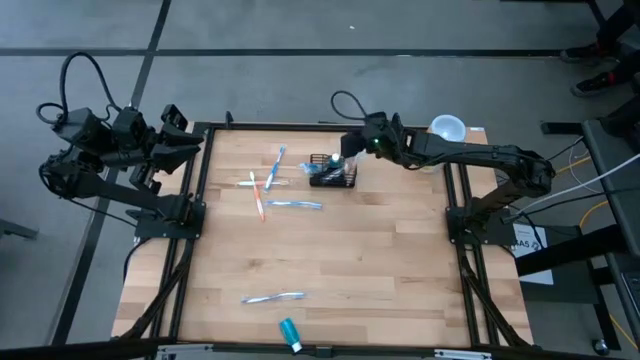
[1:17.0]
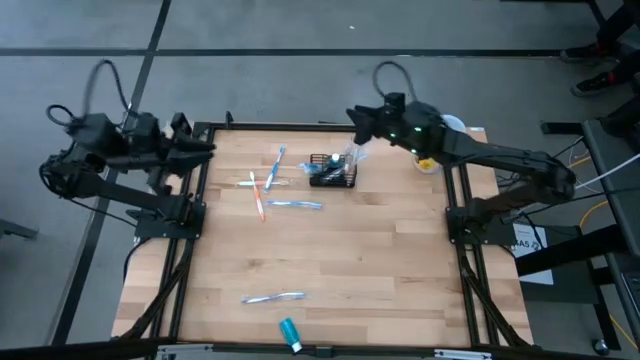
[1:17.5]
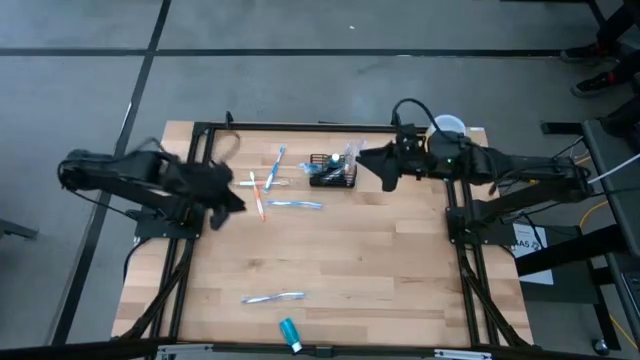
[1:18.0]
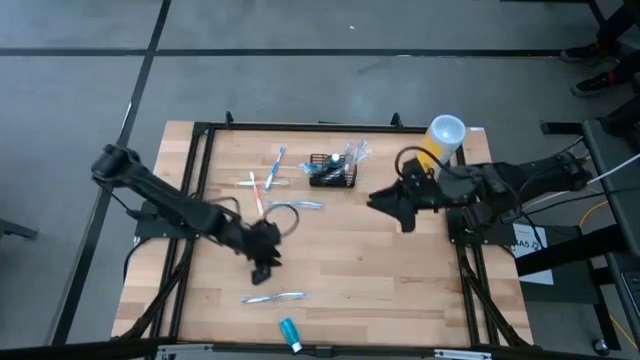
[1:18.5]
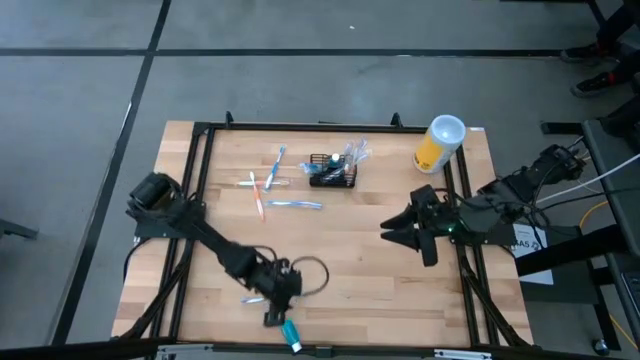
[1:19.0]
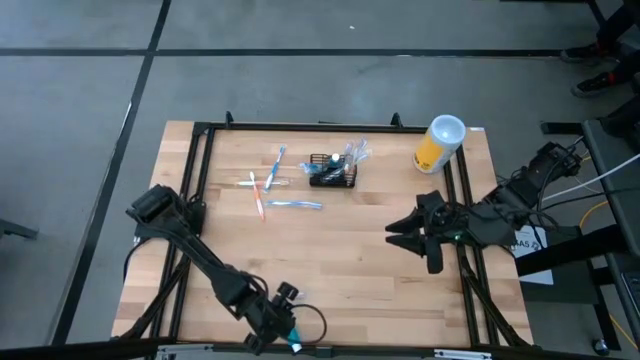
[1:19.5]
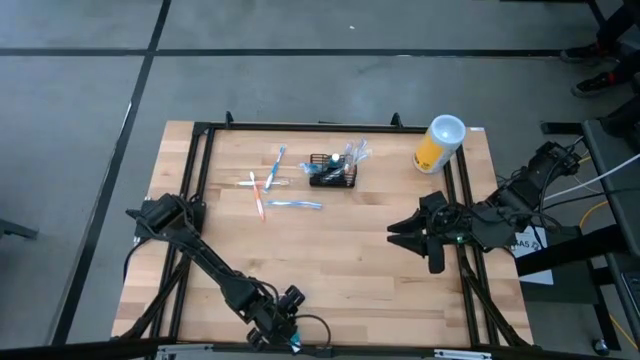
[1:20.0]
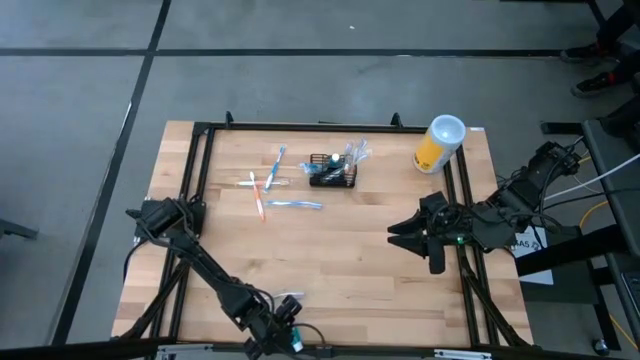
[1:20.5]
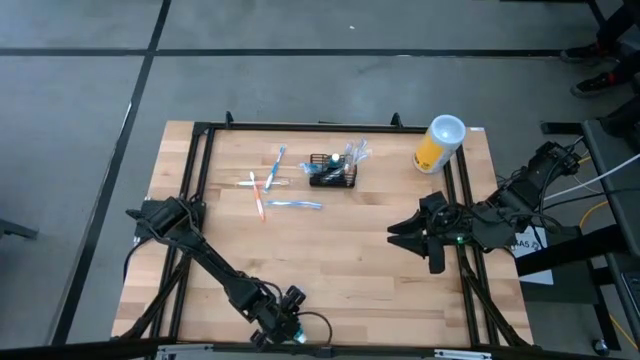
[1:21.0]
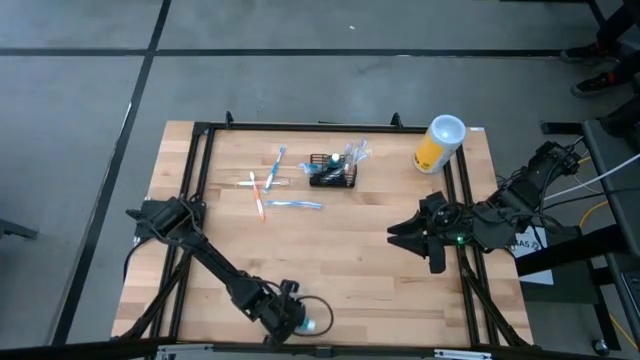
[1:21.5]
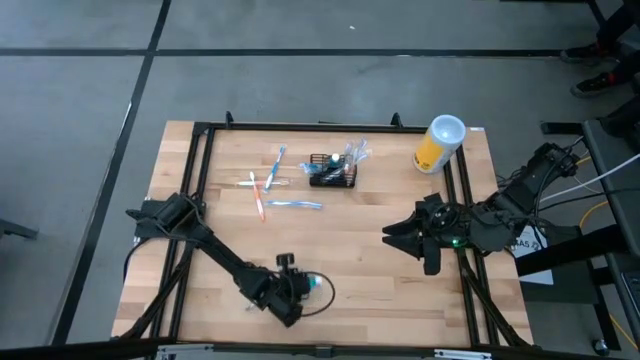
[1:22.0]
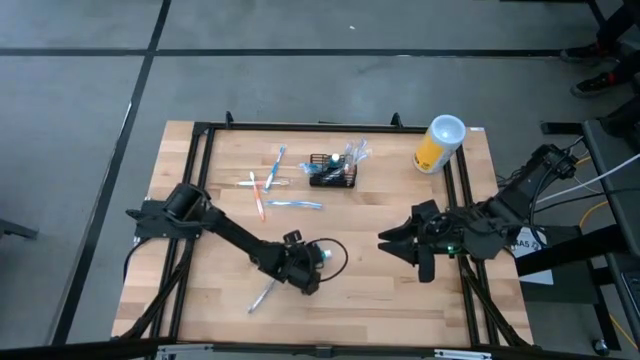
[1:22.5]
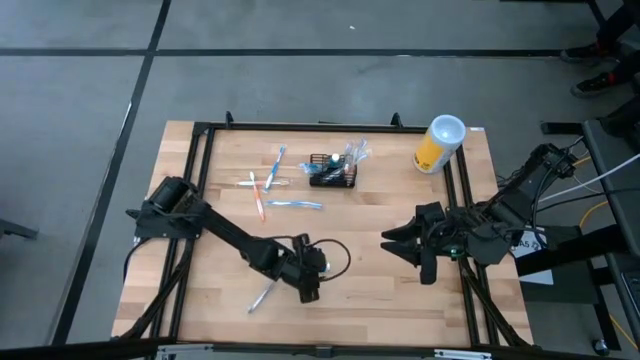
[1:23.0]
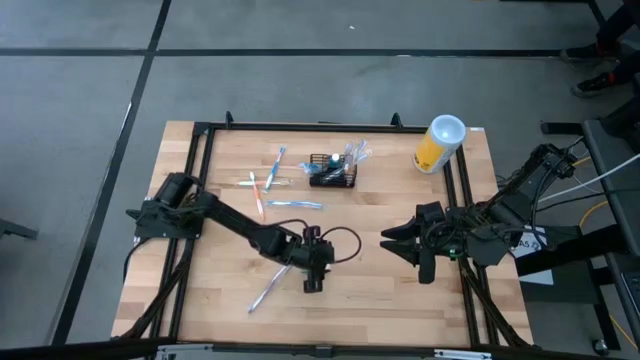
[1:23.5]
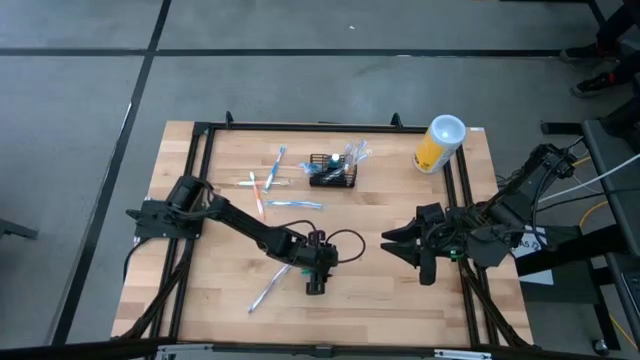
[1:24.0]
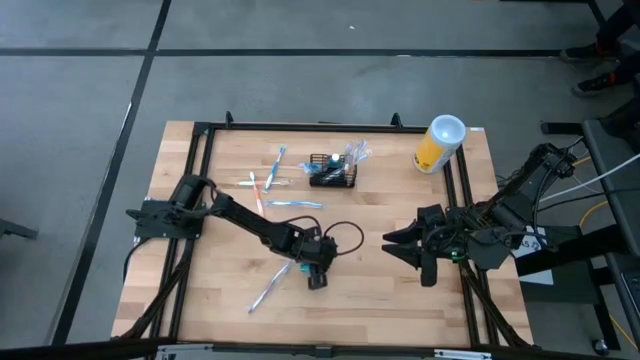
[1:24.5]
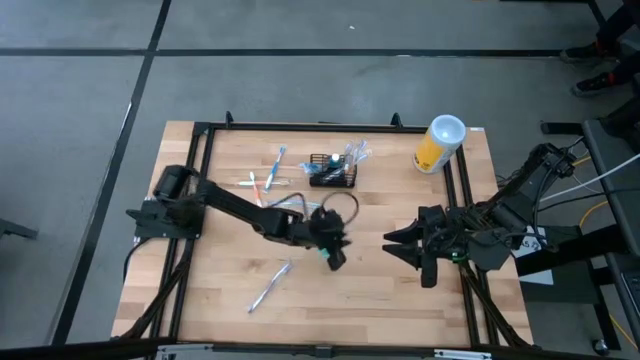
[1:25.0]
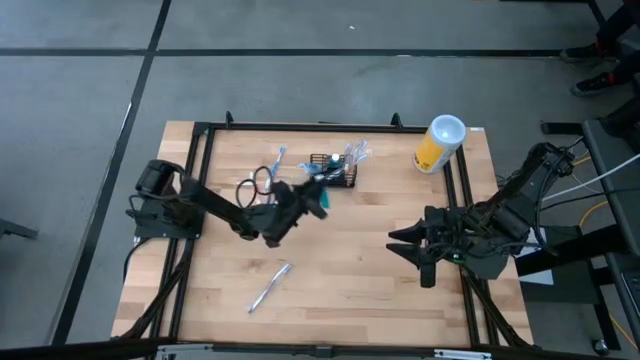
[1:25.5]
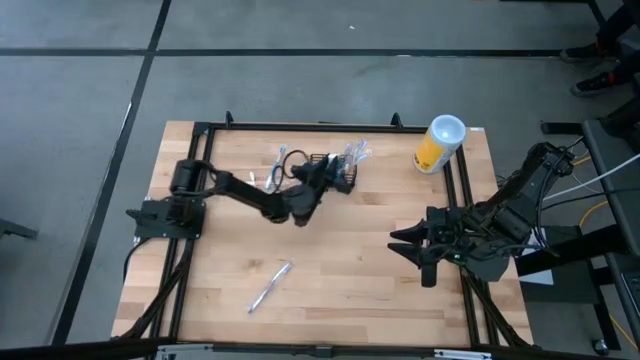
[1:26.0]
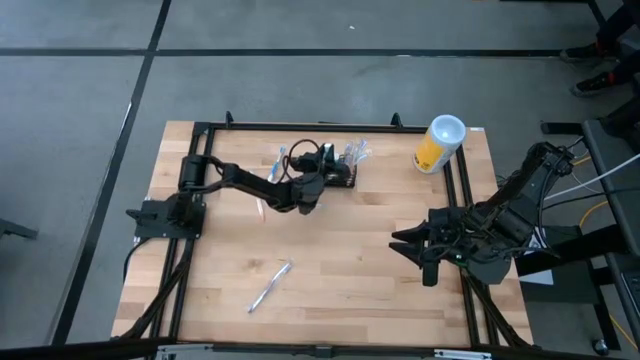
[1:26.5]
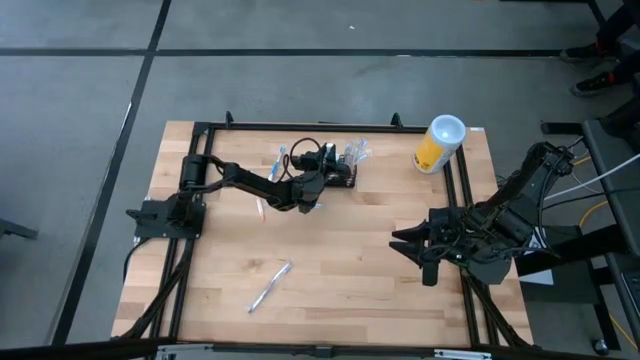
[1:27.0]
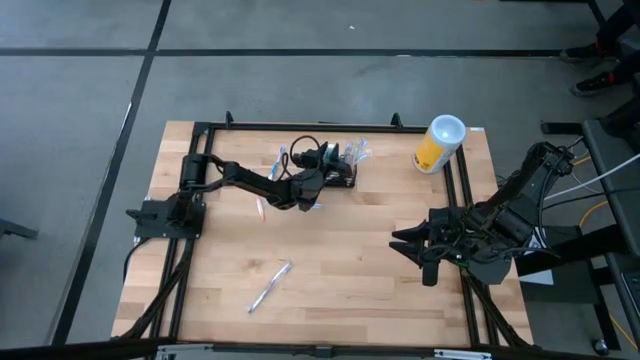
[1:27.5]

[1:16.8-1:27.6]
Task: Pick & Place toothbrushing station
Put the blue mouthwash into the black mesh organizer

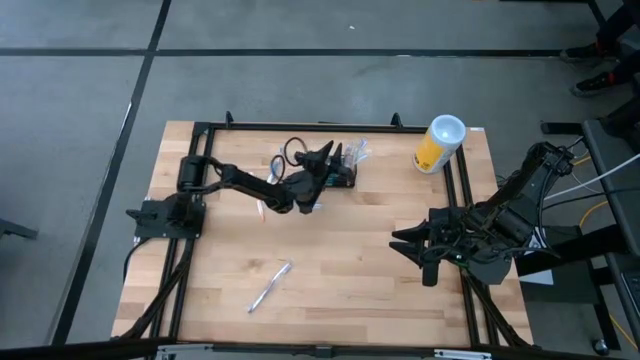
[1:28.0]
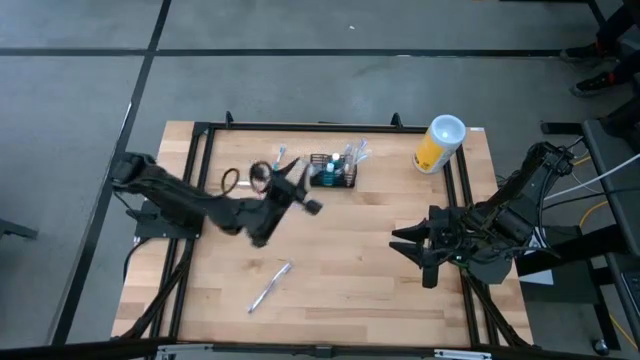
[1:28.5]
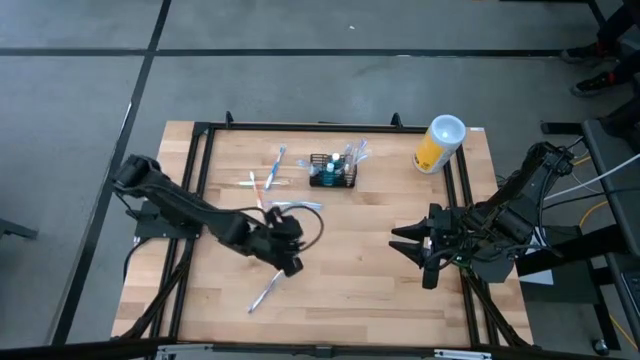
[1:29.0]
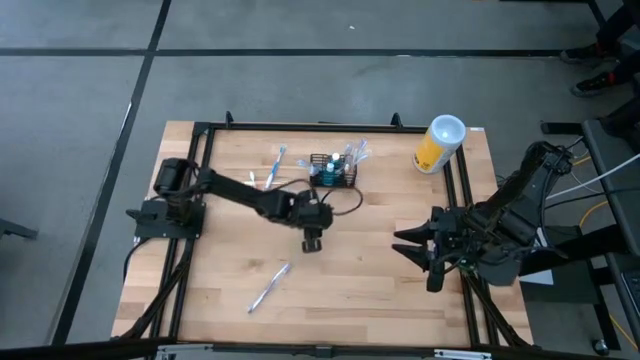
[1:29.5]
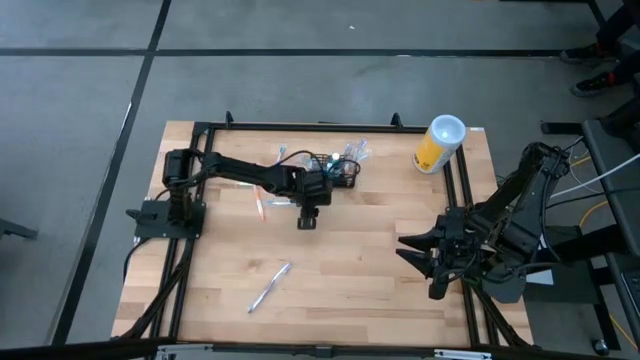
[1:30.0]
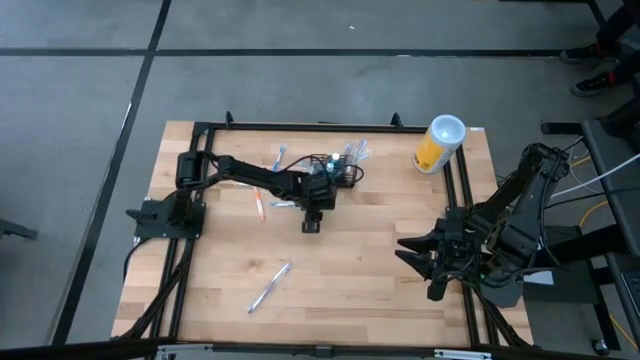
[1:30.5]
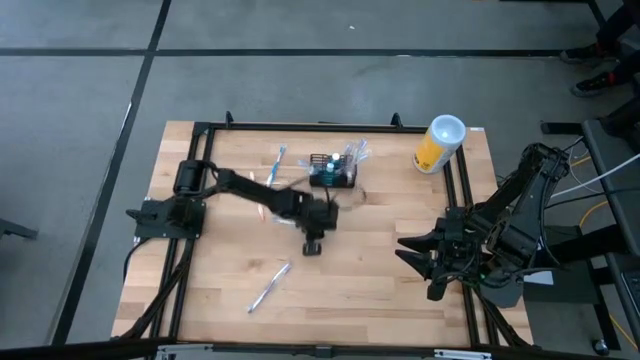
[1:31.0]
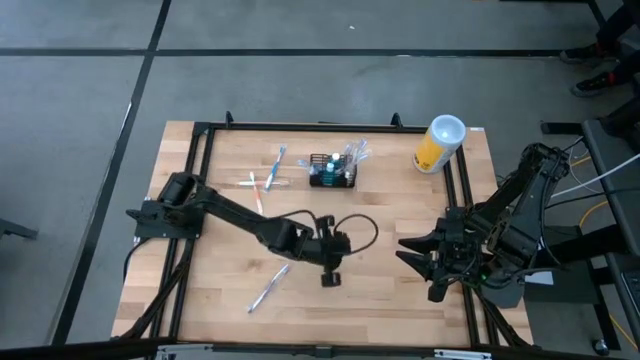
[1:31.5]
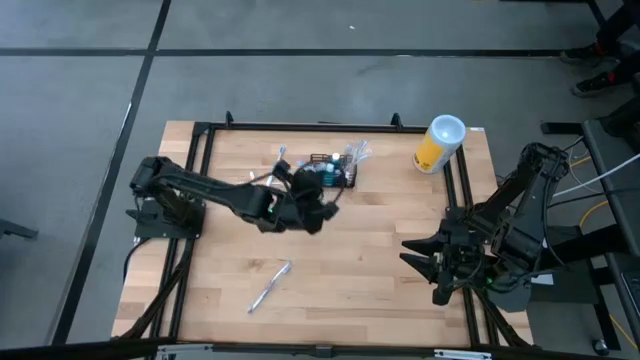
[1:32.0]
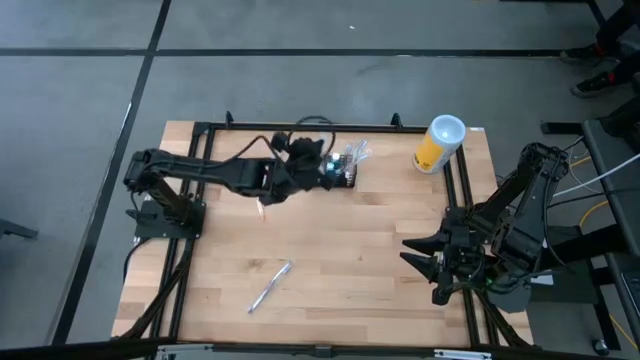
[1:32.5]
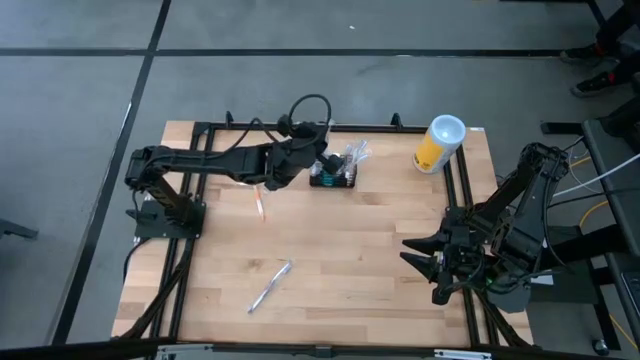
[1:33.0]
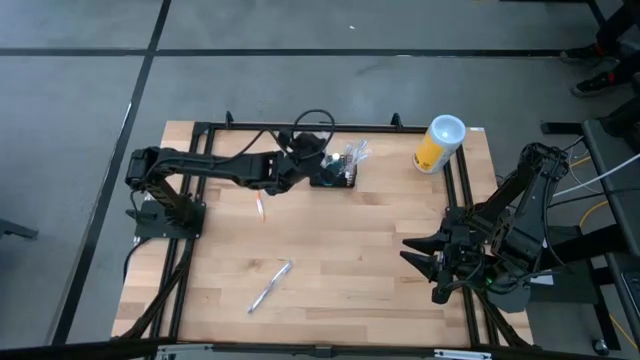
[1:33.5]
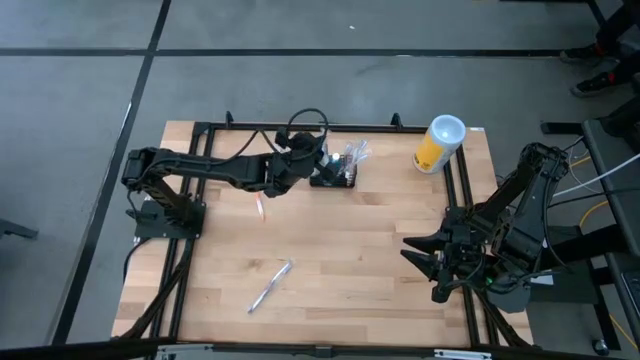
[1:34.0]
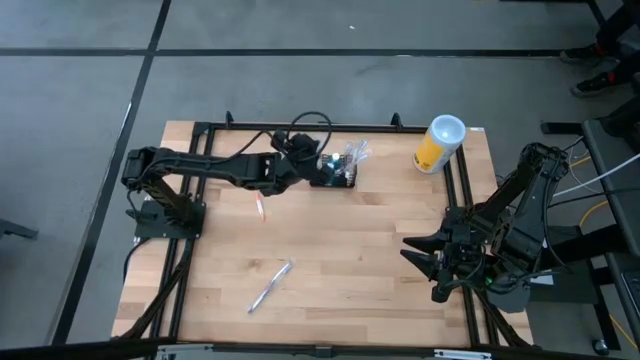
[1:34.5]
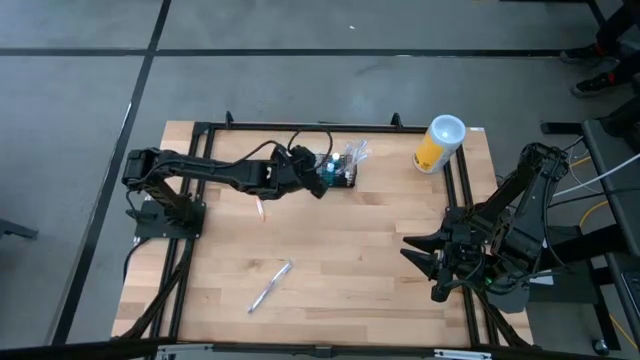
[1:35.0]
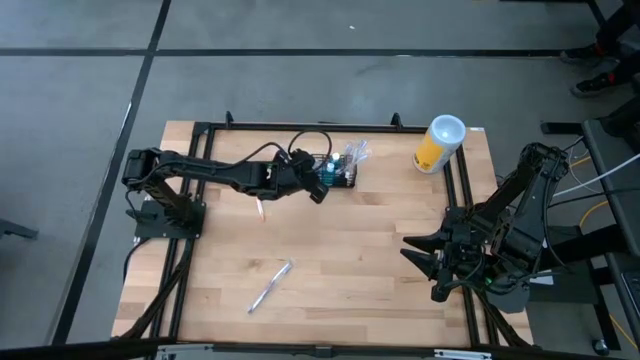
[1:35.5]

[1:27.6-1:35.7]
Put the blue toothbrush into the black mesh organizer

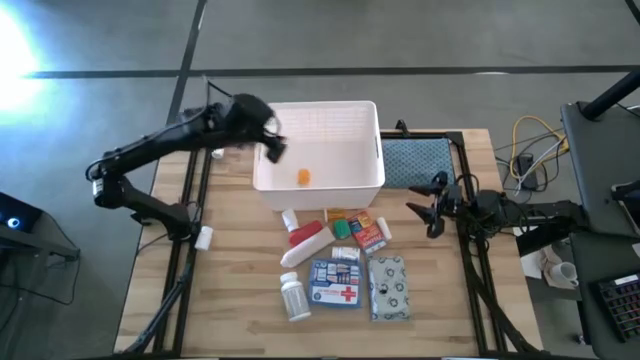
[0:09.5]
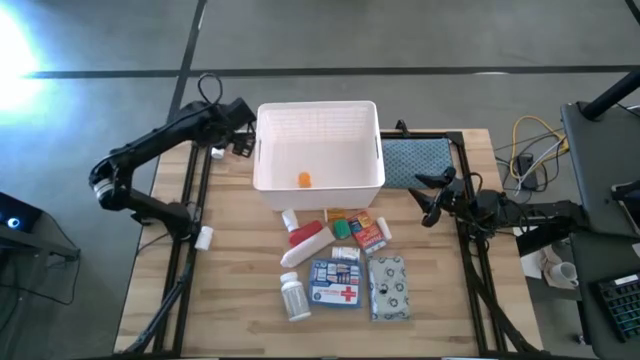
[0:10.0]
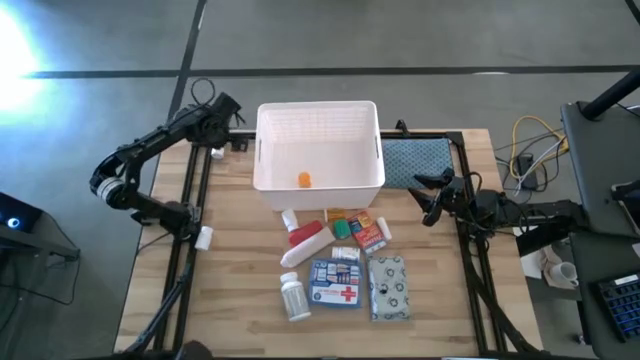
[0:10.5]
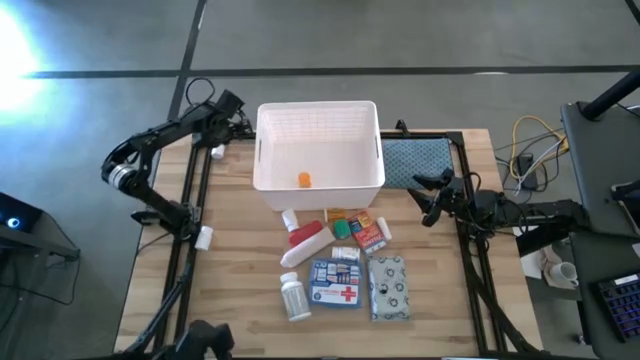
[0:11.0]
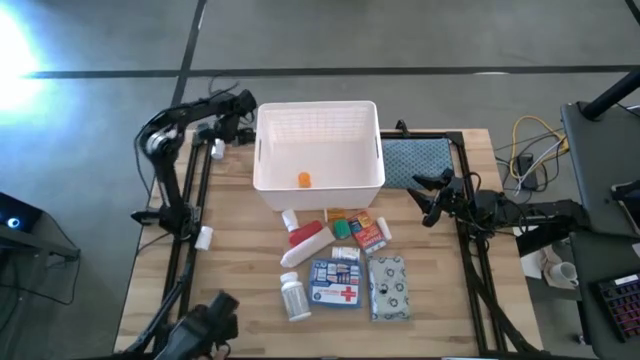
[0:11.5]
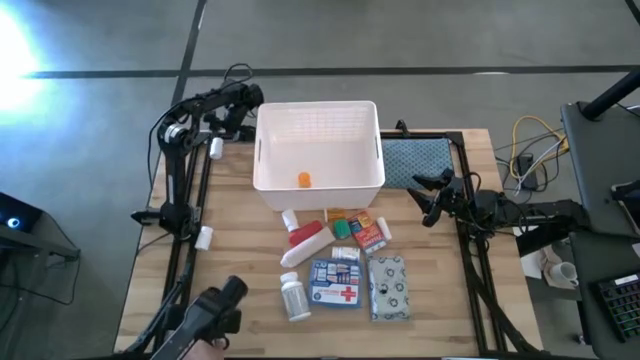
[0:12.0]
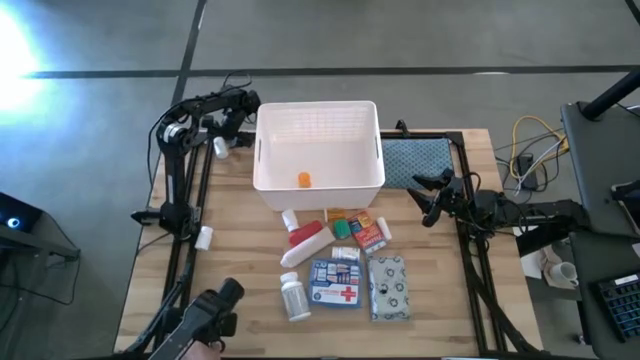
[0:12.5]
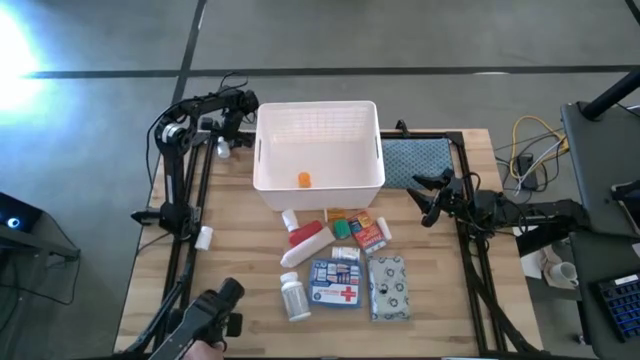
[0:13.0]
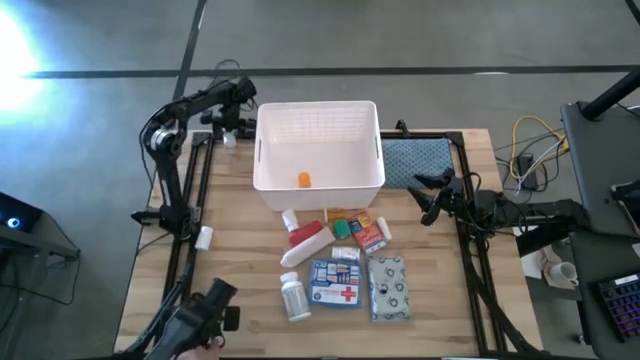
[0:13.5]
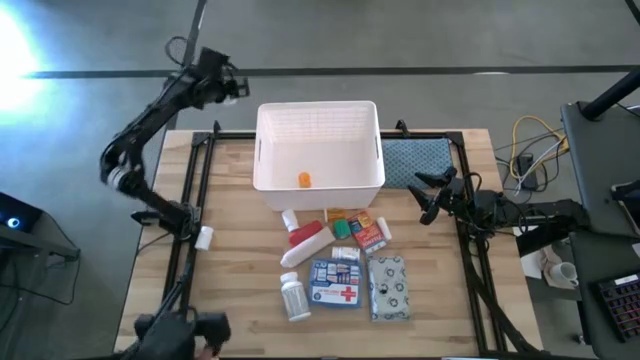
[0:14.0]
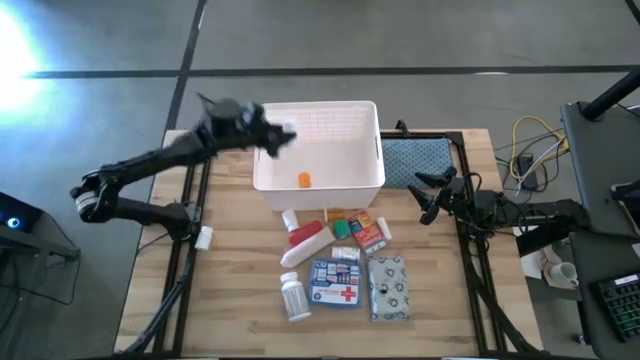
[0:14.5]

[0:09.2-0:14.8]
Task: Pick & place medical supplies in basket/bin
Put the white pill bottle into the white container
